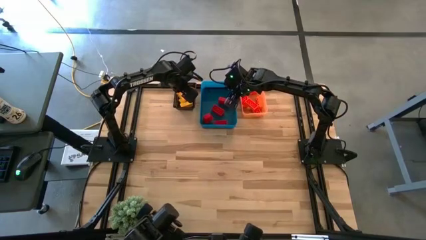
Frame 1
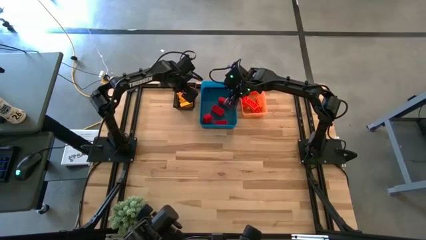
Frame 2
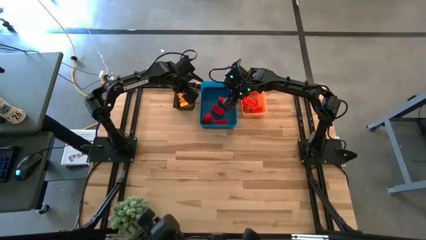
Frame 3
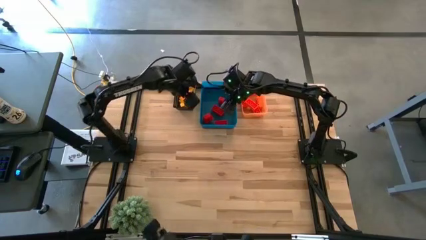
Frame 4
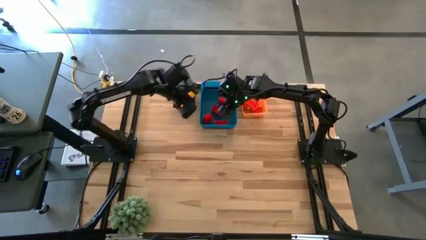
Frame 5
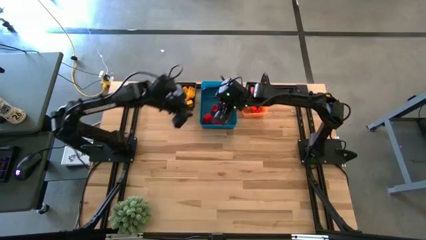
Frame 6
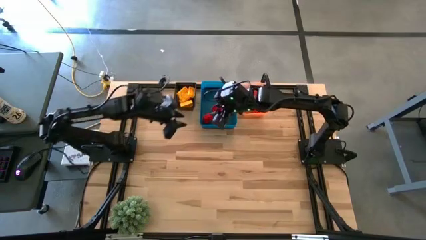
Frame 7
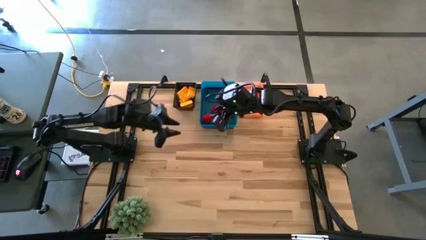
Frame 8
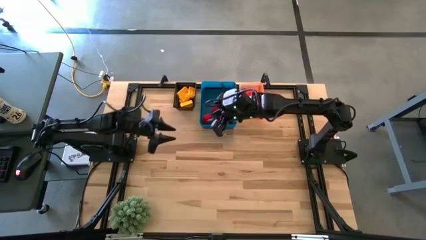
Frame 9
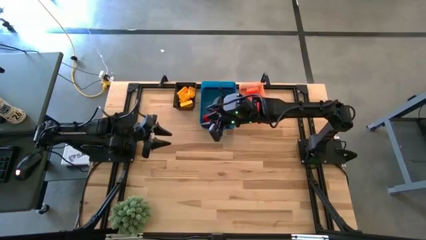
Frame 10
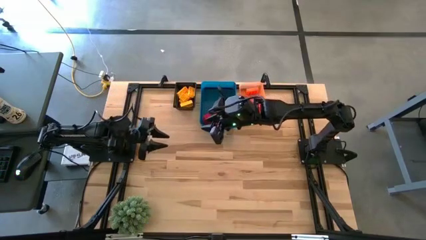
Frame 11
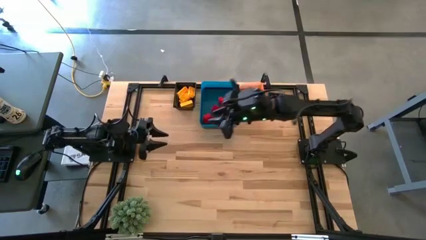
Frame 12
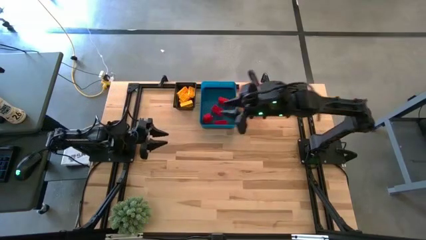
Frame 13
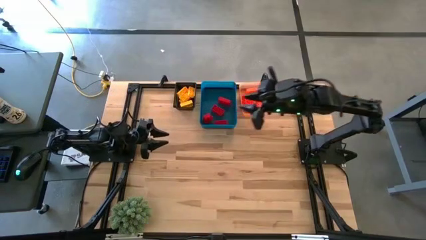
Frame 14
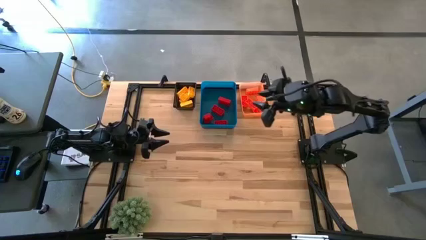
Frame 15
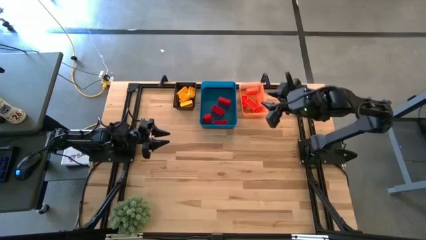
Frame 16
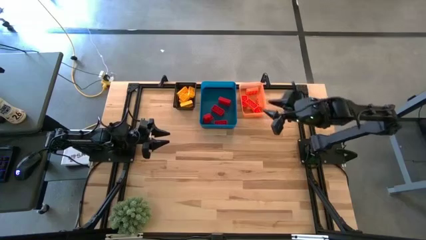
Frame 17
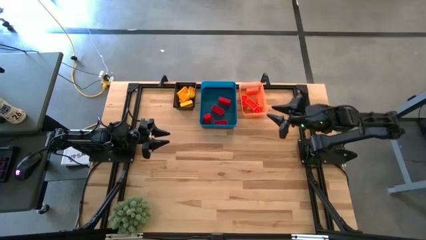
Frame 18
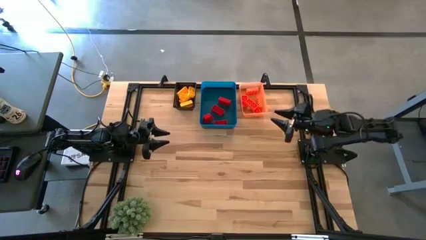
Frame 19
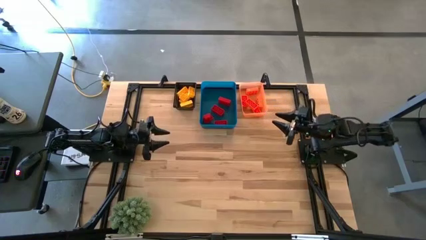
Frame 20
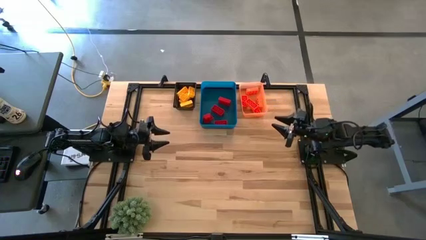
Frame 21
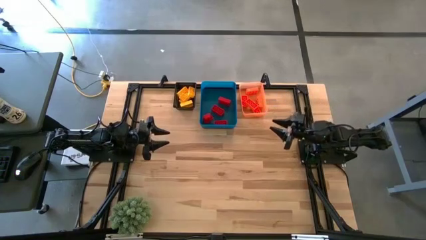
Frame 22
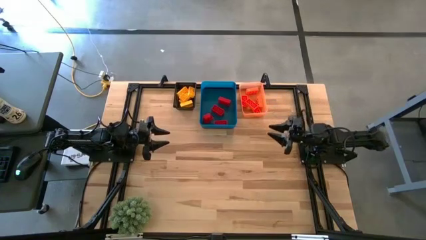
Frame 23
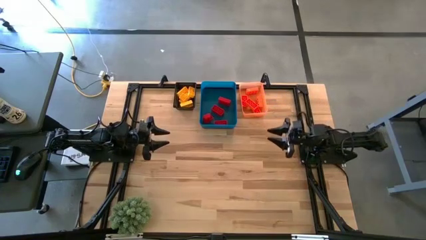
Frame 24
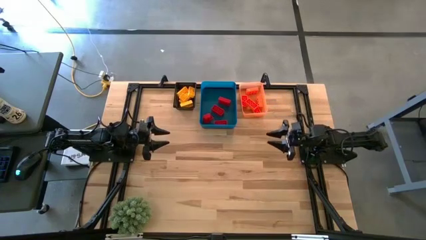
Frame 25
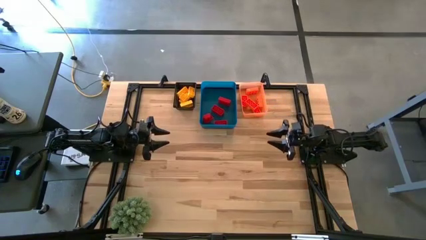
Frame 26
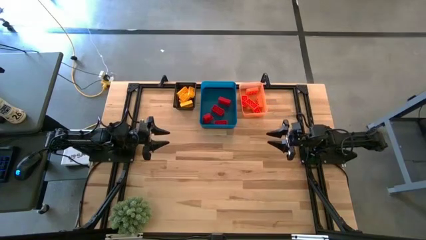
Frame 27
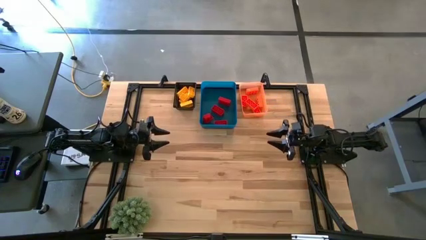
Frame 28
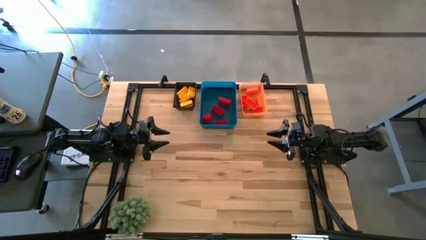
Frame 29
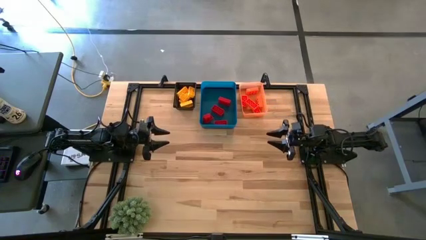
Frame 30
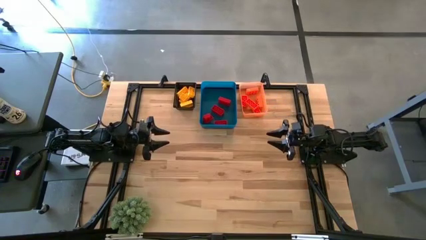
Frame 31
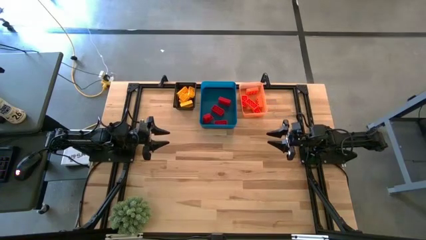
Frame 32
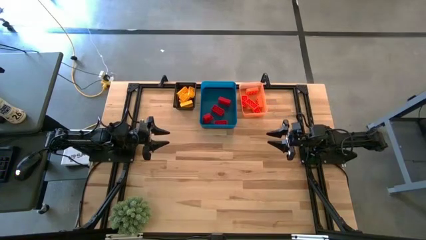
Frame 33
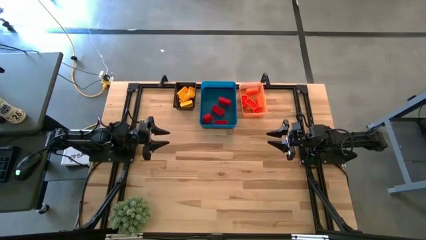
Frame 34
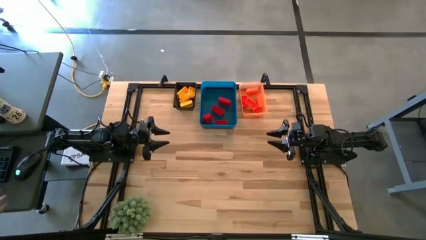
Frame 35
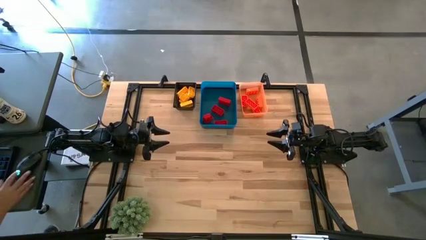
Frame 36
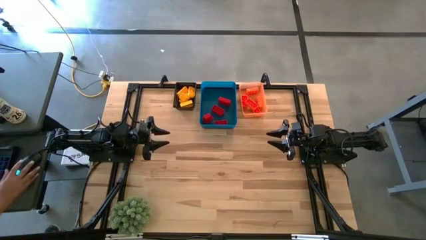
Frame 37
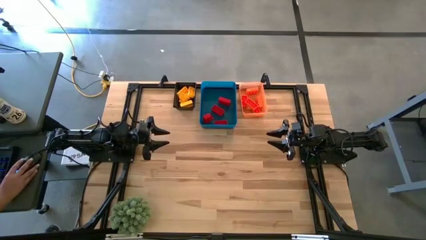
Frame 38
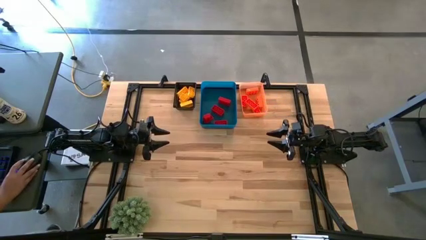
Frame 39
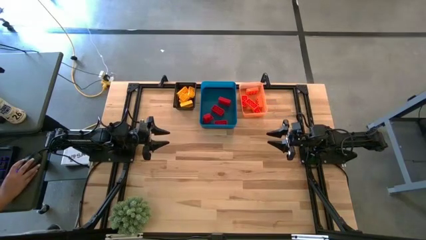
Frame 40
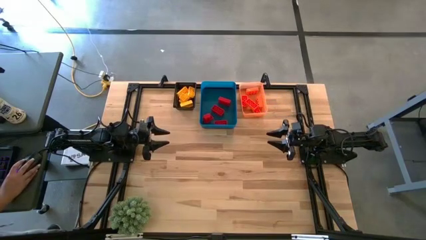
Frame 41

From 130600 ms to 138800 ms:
Task: Sort & place blocks by color
Return to Home Position

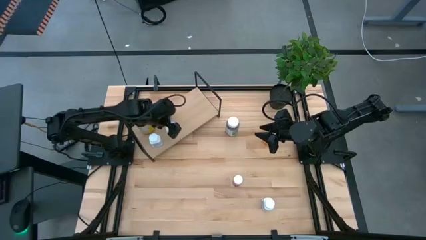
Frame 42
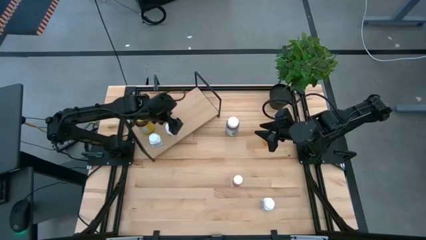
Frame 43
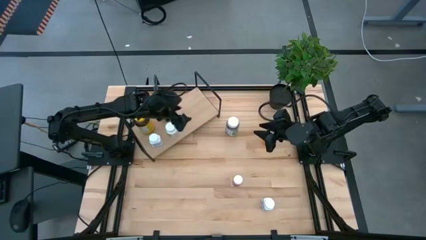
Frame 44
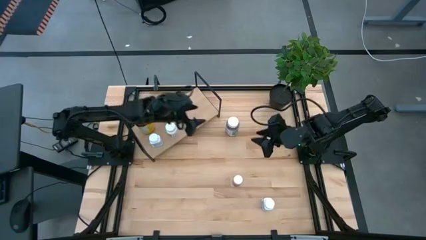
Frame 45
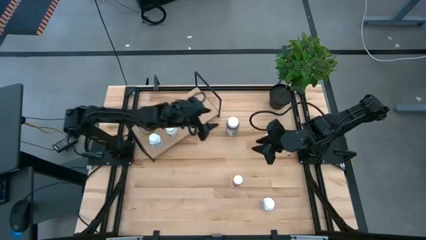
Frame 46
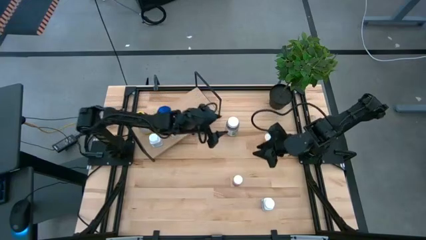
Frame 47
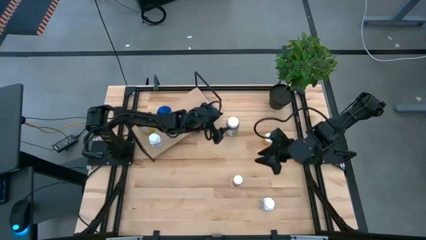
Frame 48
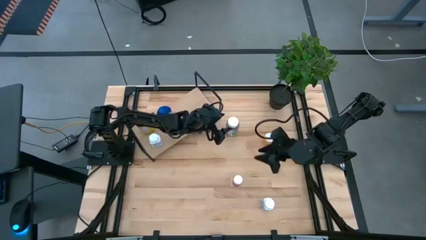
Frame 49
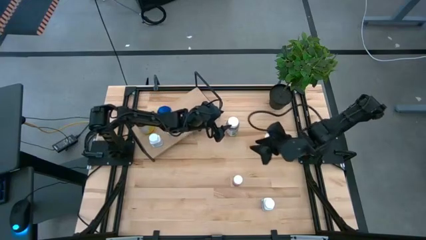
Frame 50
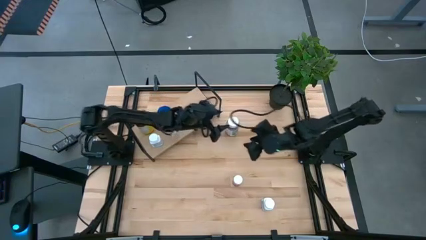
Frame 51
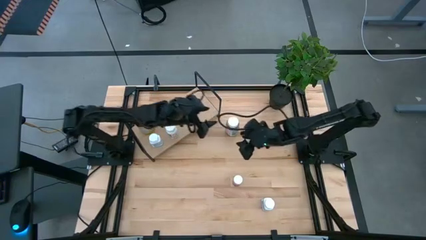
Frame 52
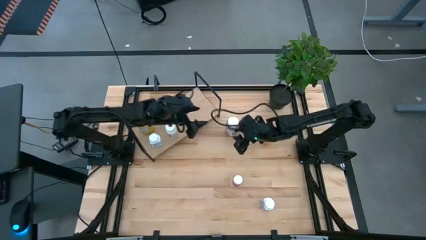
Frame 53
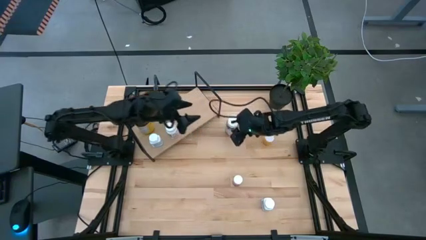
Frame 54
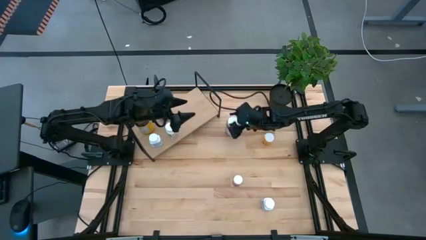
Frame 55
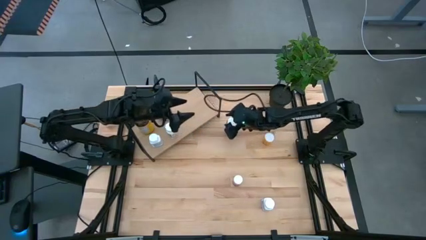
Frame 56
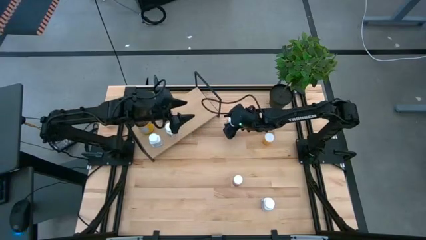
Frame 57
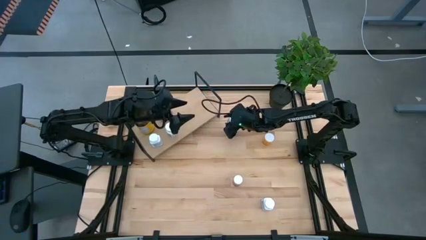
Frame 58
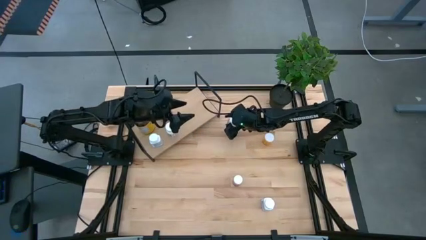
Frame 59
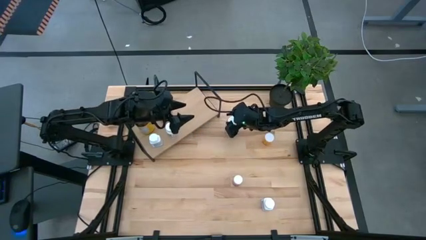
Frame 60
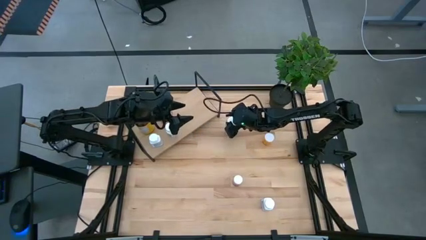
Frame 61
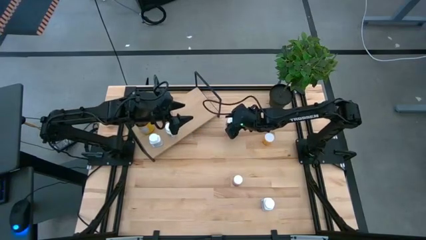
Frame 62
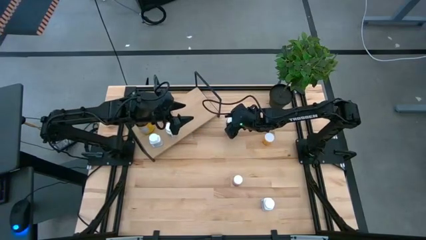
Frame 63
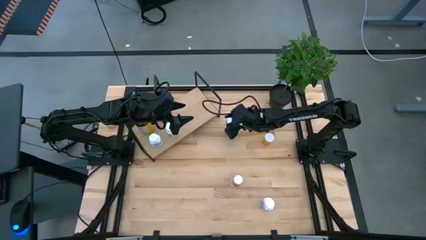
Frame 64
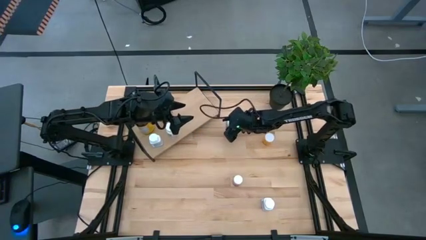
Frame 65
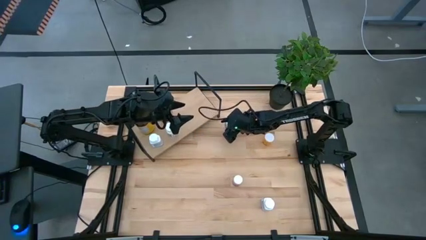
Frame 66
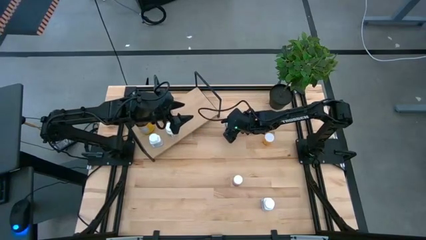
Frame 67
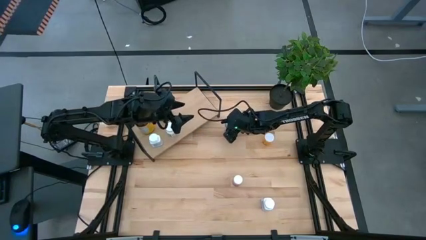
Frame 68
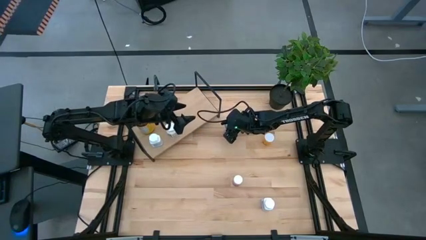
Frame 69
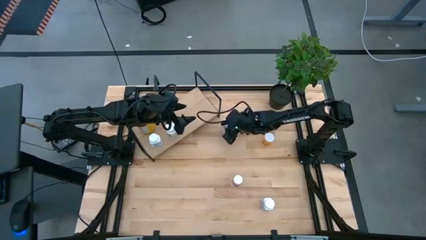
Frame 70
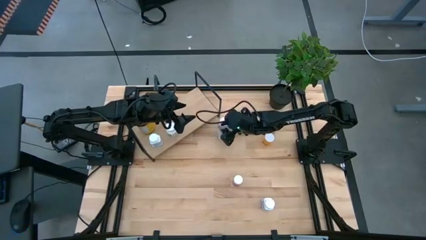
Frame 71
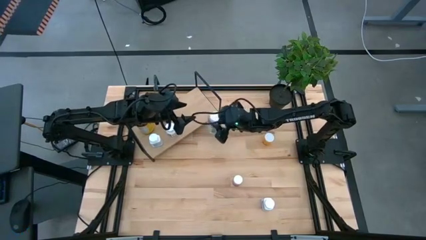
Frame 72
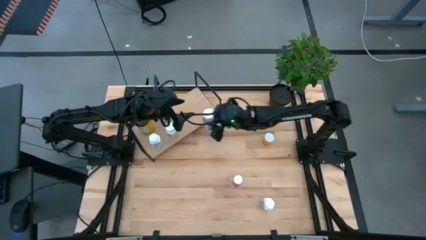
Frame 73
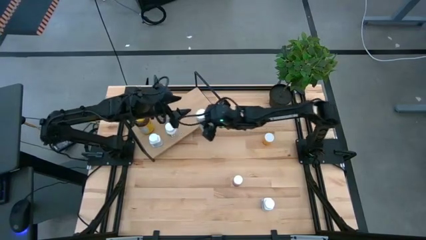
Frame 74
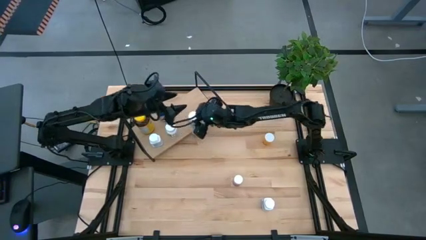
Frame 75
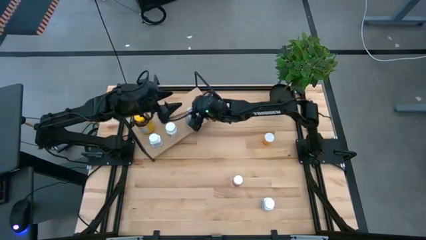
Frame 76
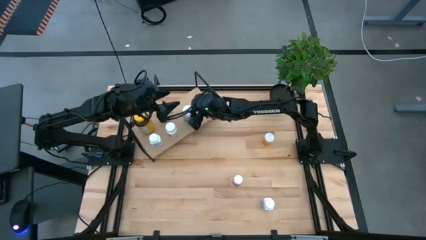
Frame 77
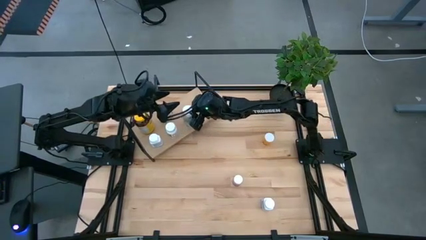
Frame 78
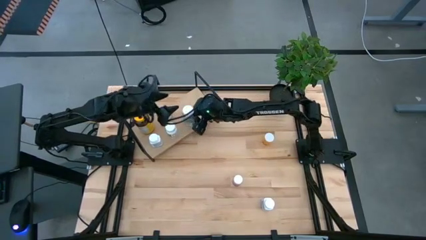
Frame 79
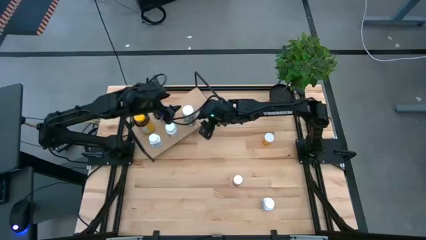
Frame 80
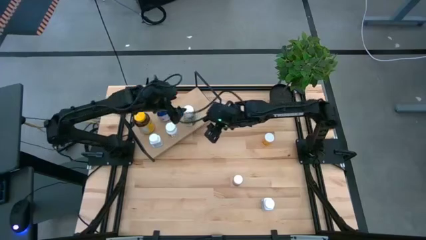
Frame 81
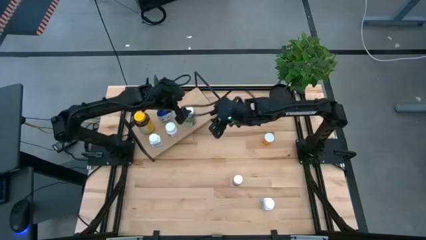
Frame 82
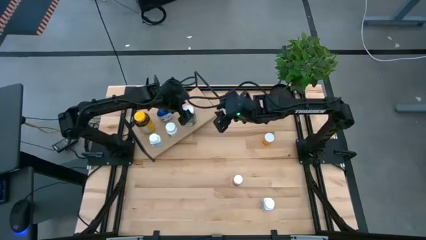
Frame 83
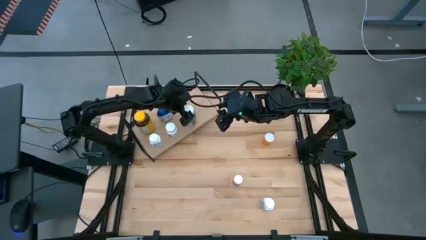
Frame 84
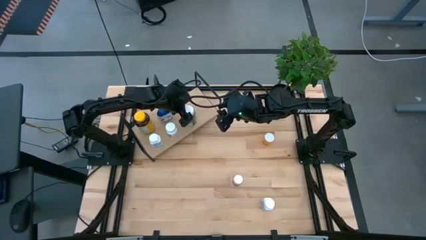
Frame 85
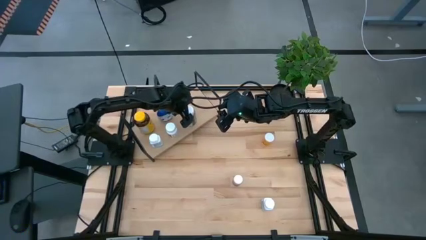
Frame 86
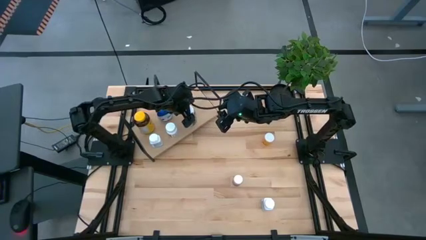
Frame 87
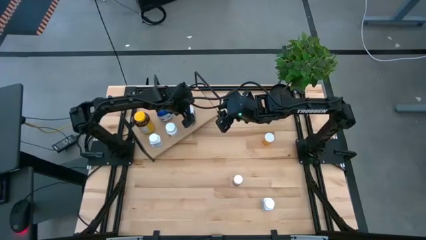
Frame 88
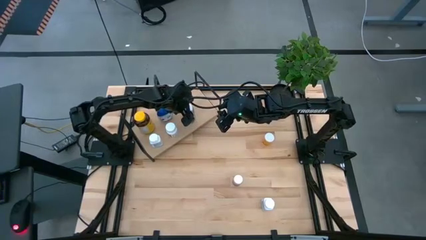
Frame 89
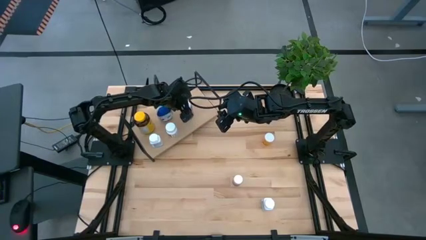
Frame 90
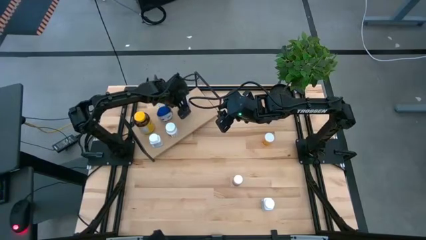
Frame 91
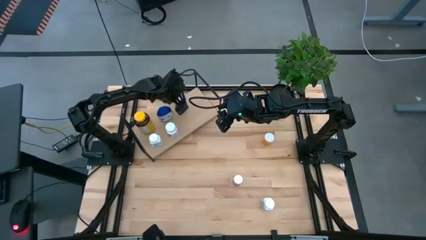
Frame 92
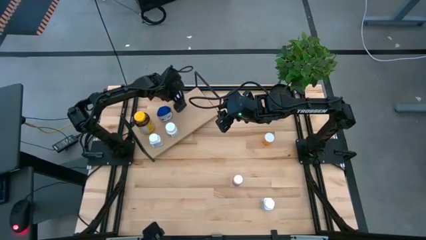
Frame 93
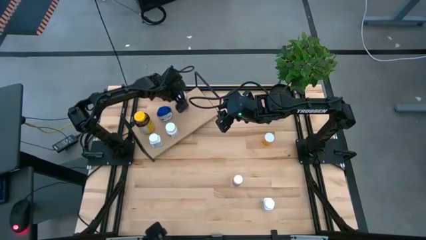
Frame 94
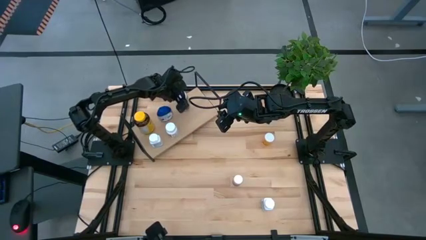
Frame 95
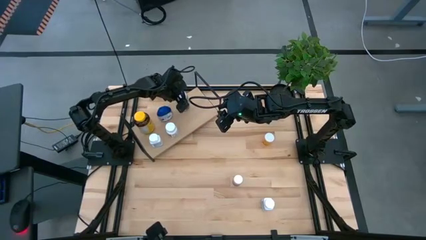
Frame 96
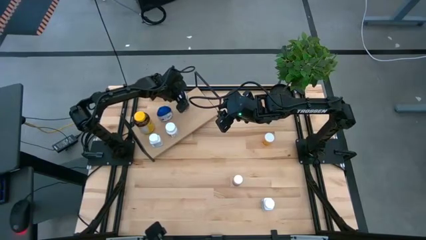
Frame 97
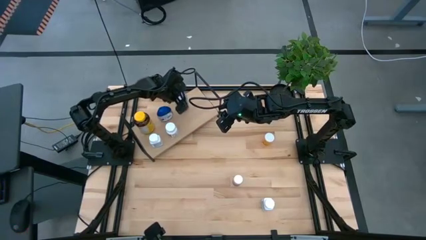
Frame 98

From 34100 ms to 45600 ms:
Task: Pick and place medicine bottles onto shelf by color
Put the green medicine bottle on the shelf
